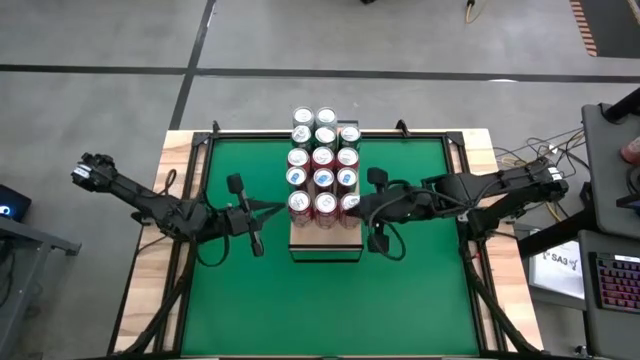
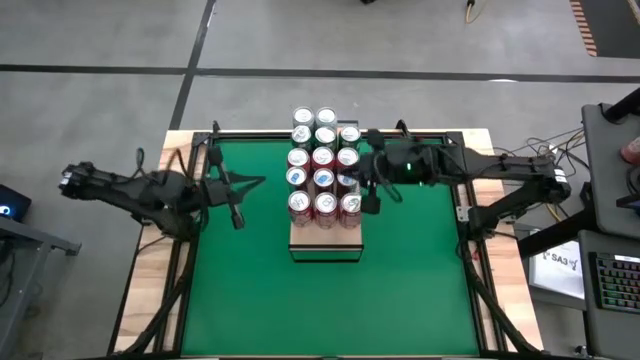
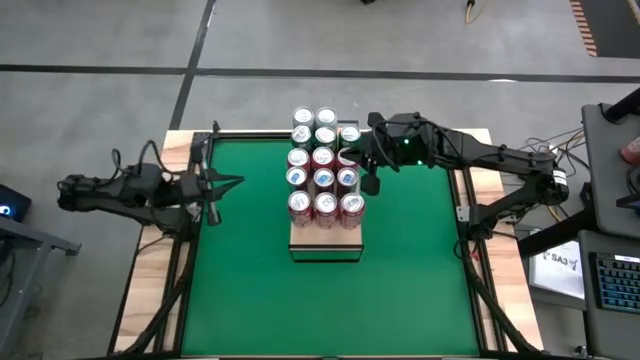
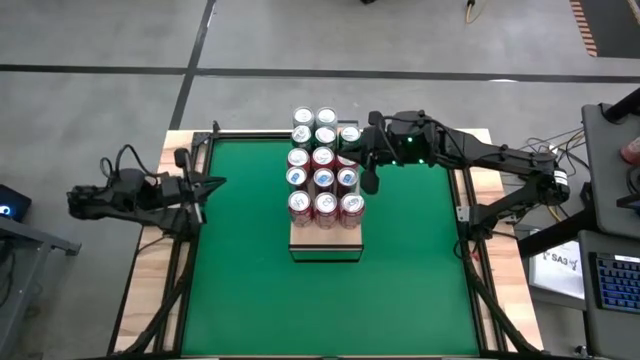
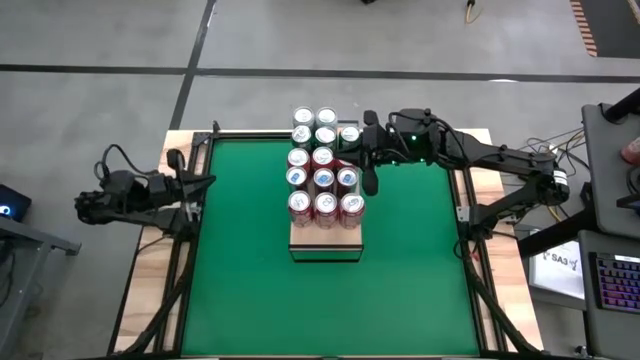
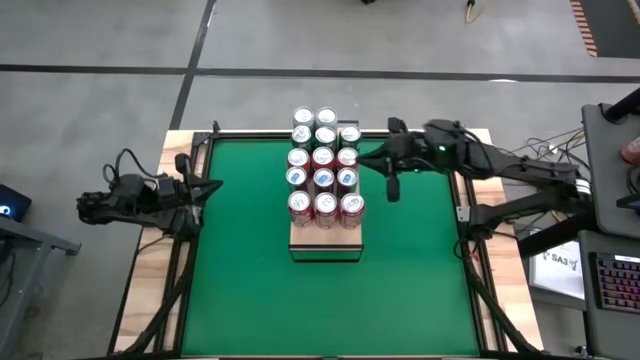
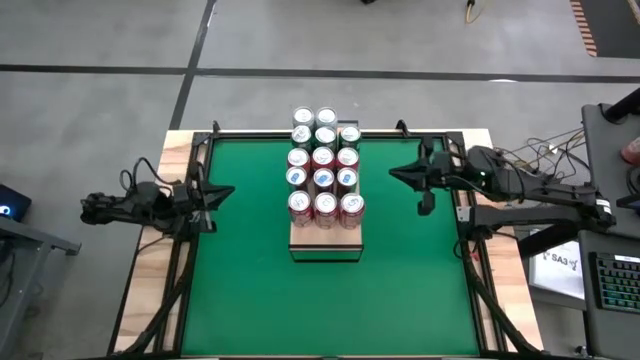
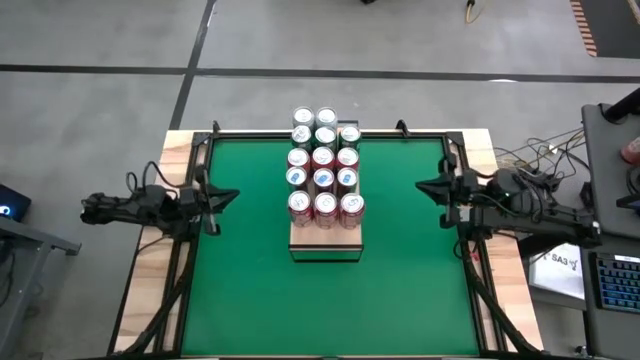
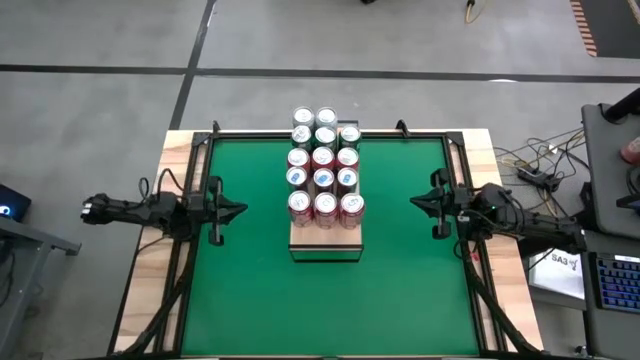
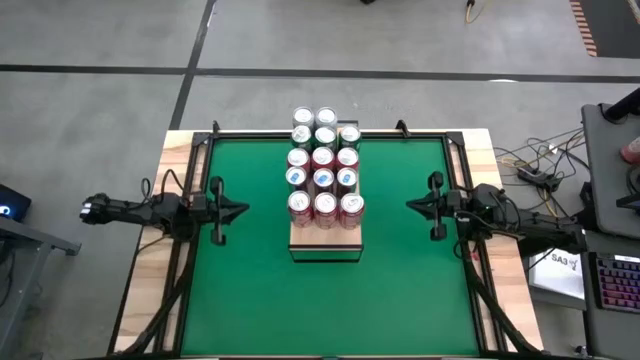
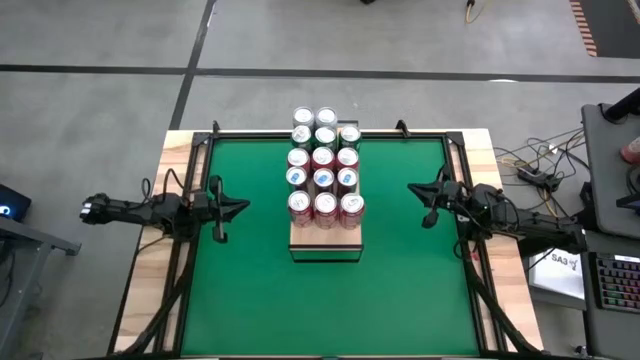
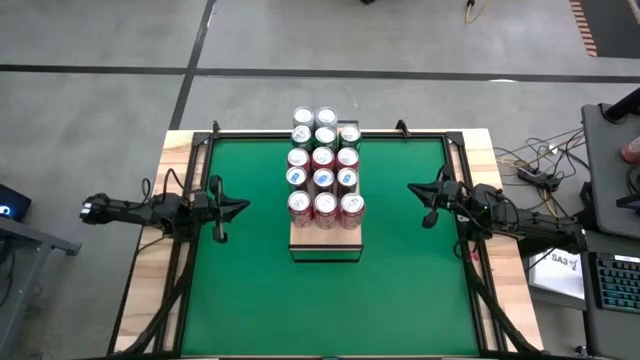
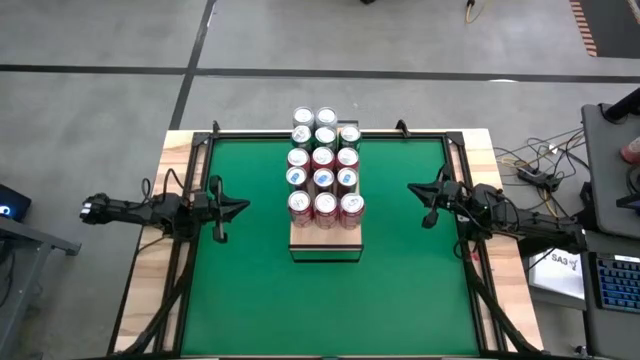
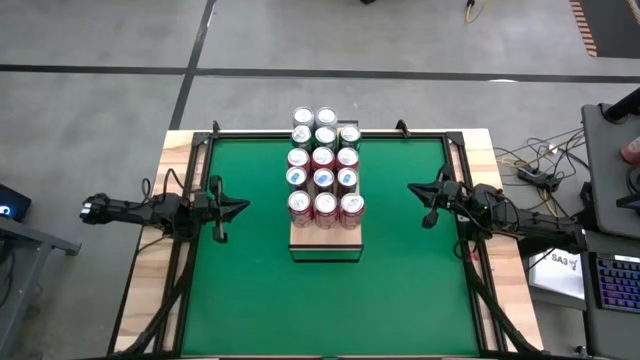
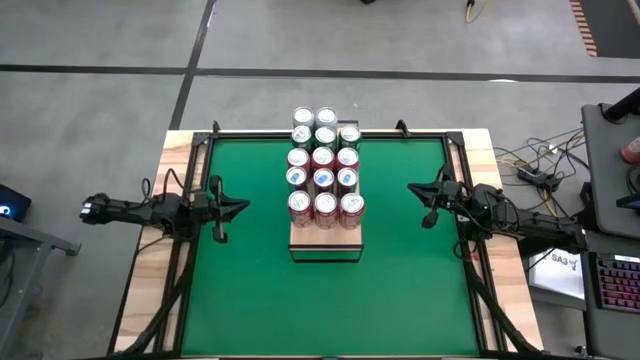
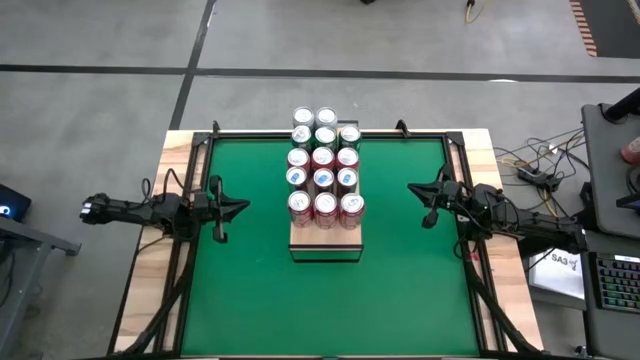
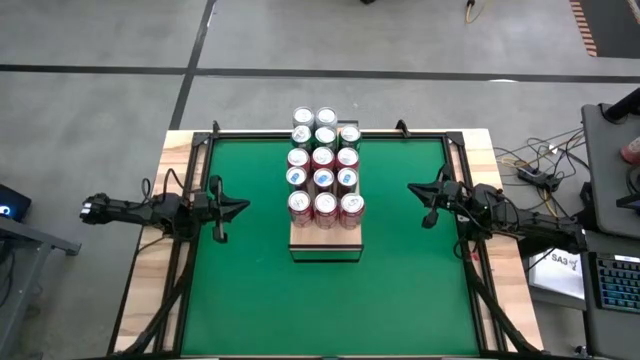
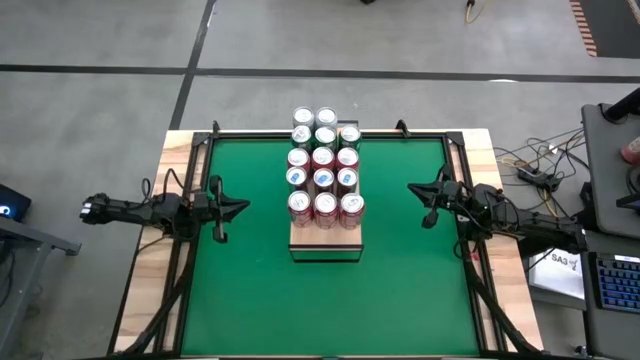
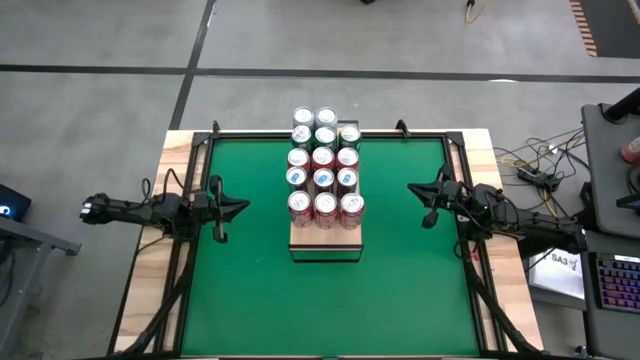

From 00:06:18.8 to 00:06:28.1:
Task: Place canned beverage on shelf
Return to Home Position

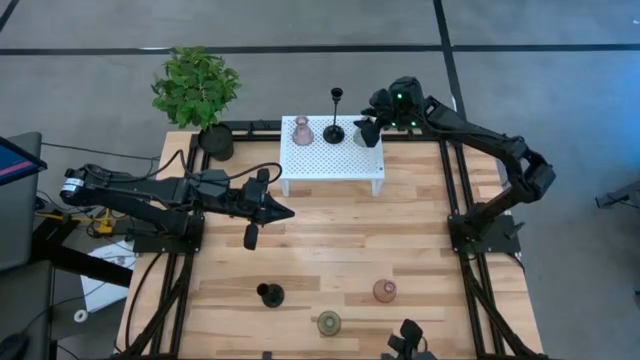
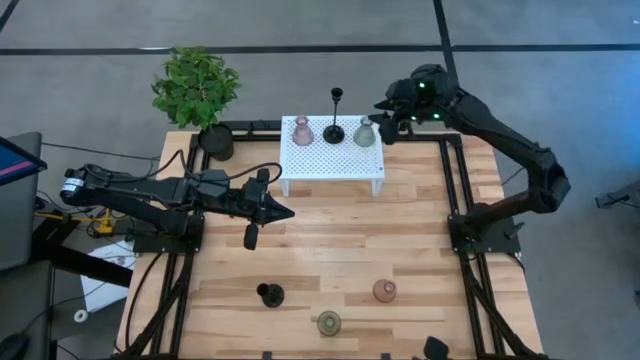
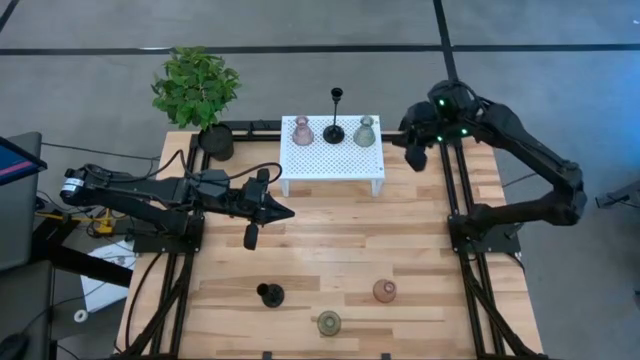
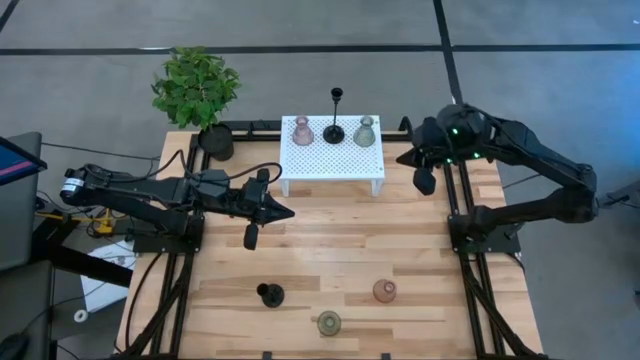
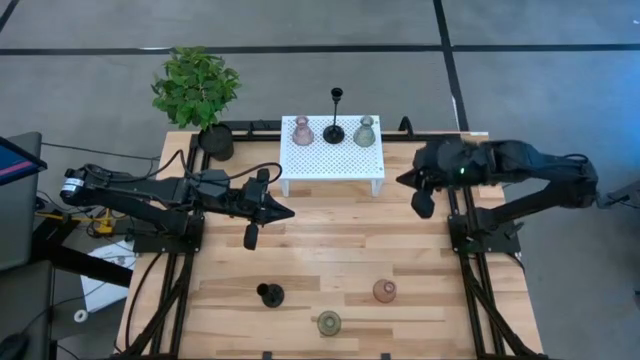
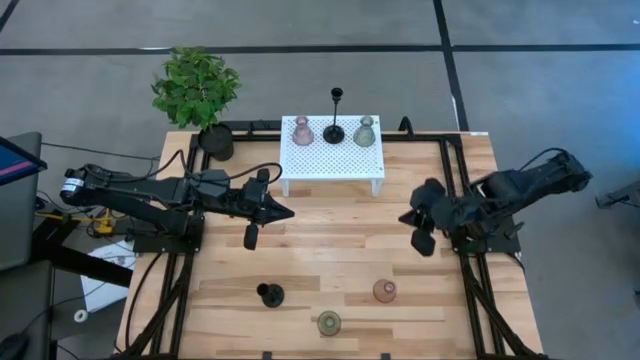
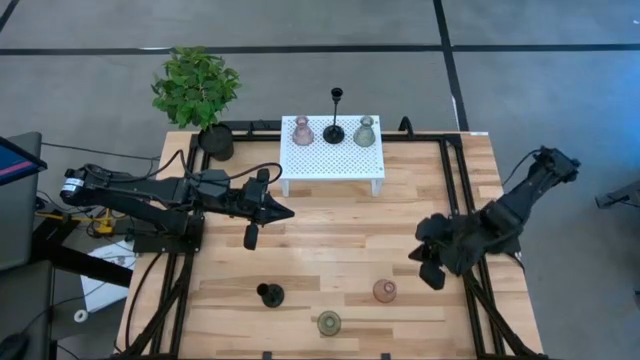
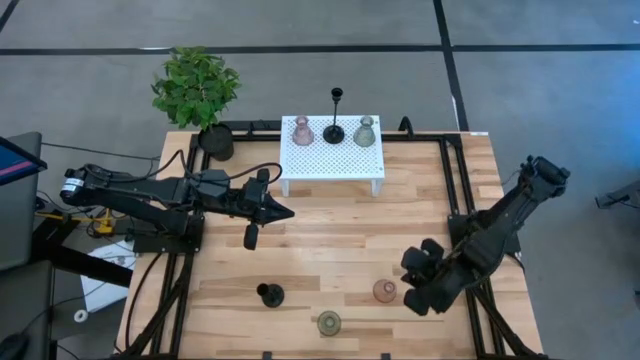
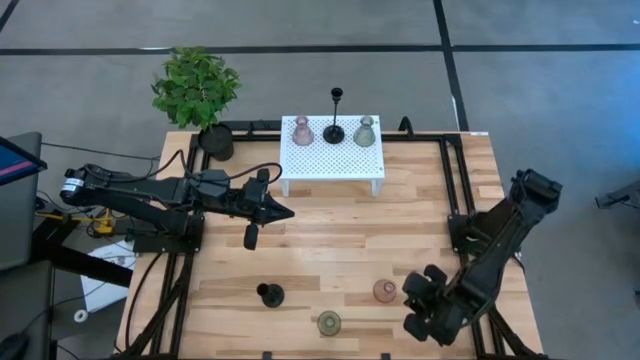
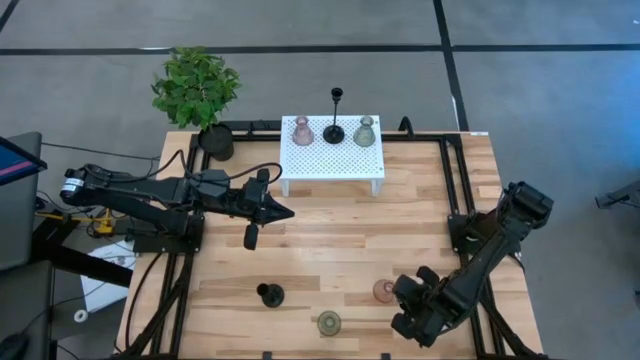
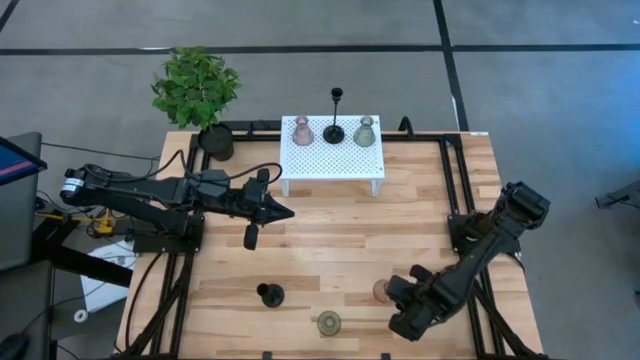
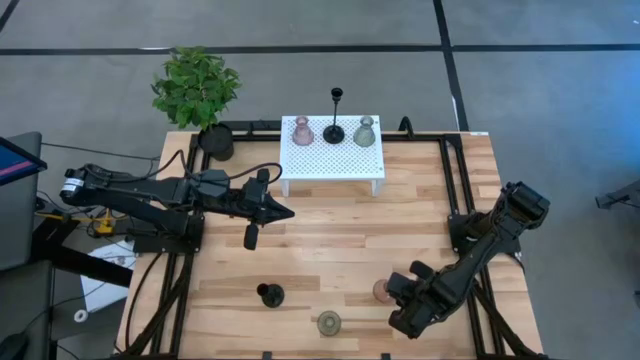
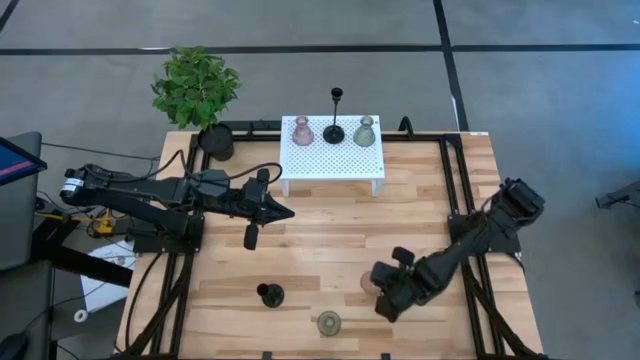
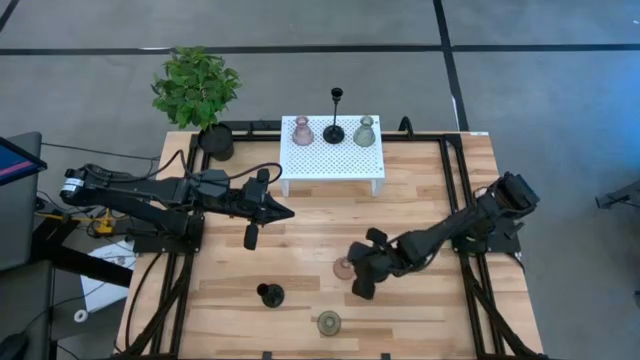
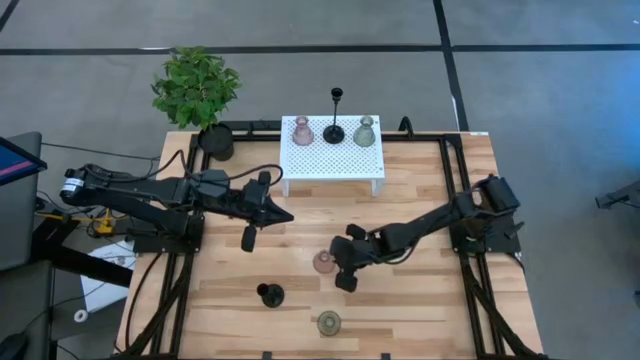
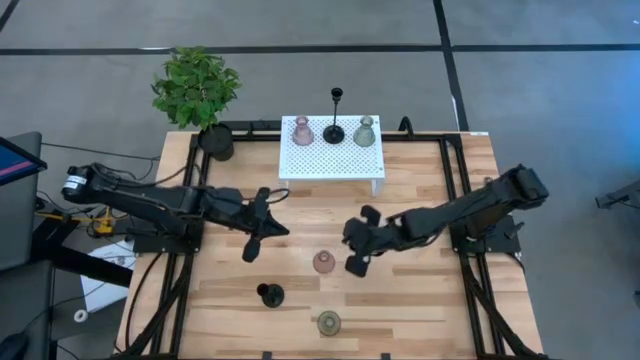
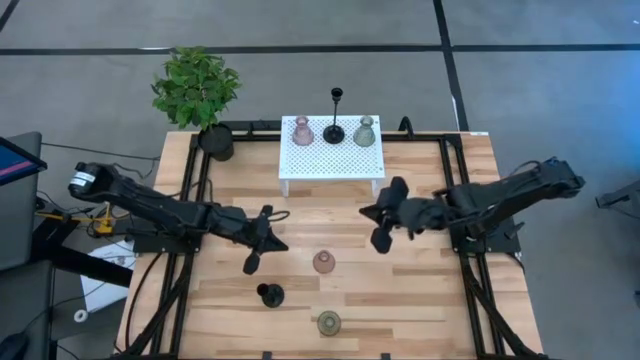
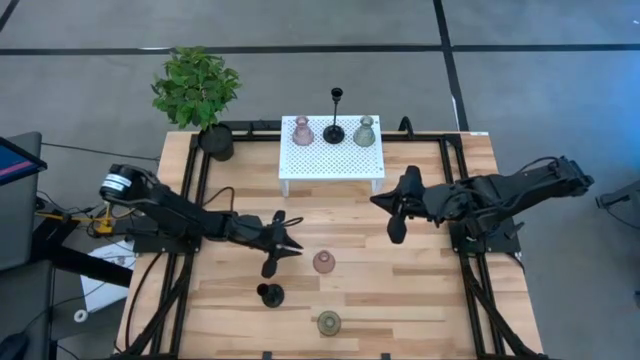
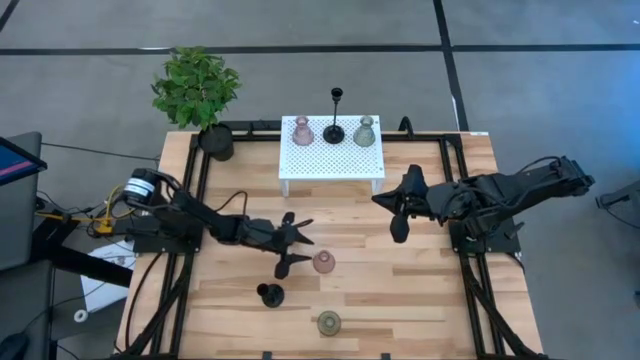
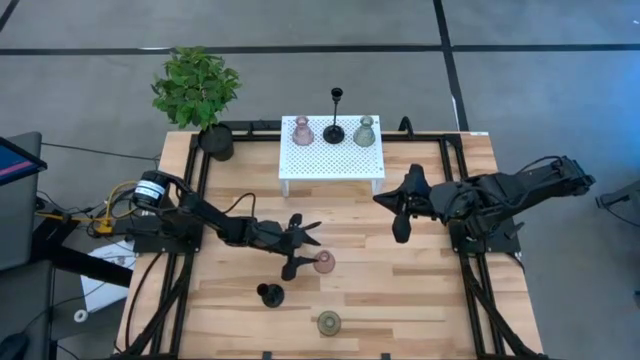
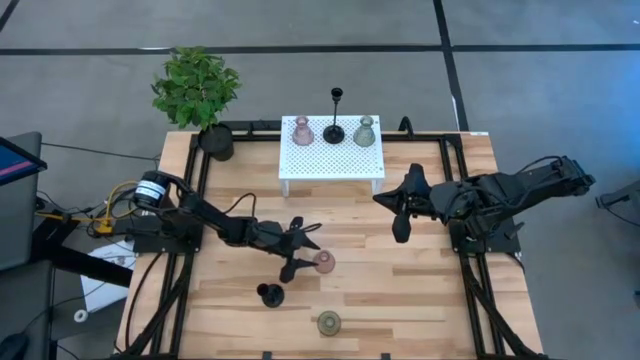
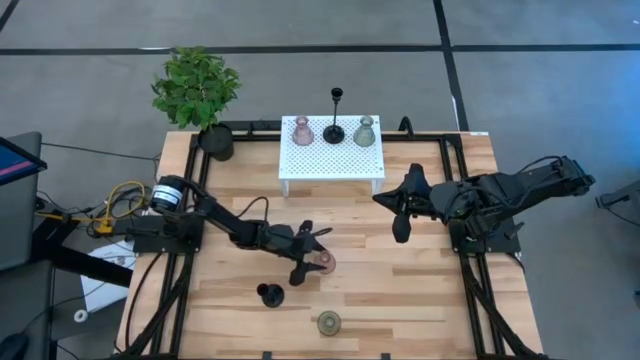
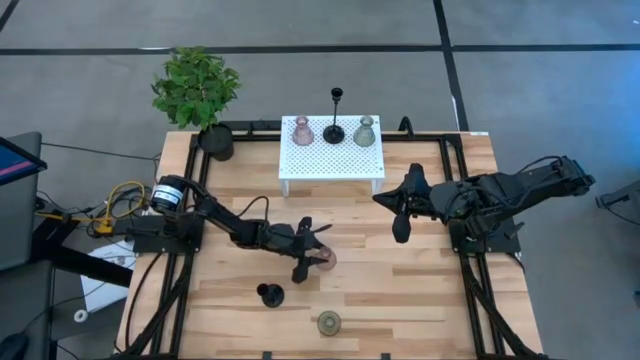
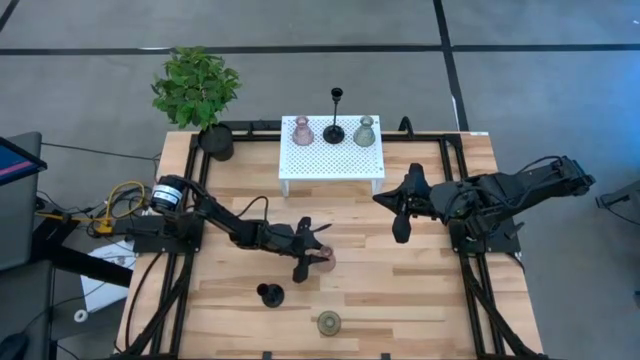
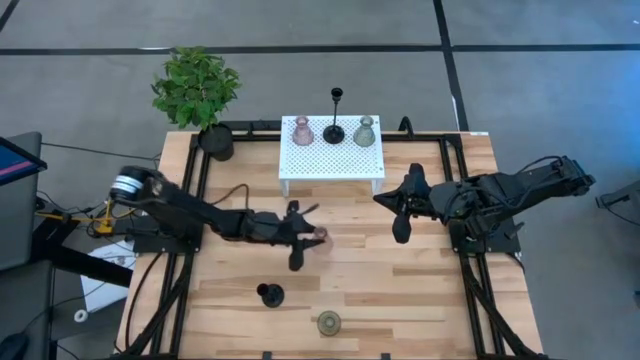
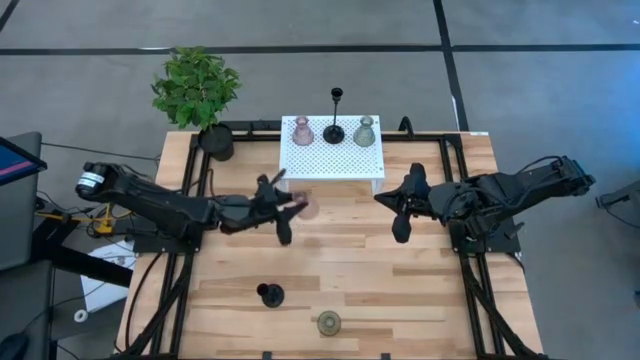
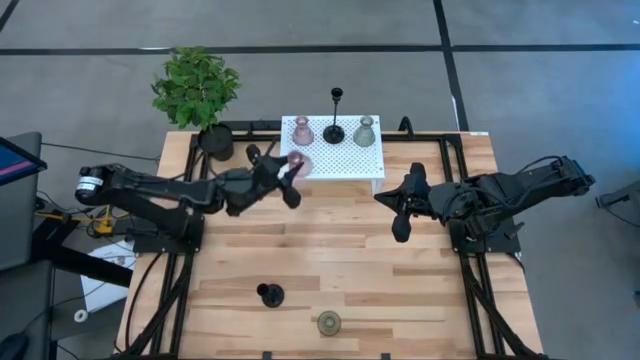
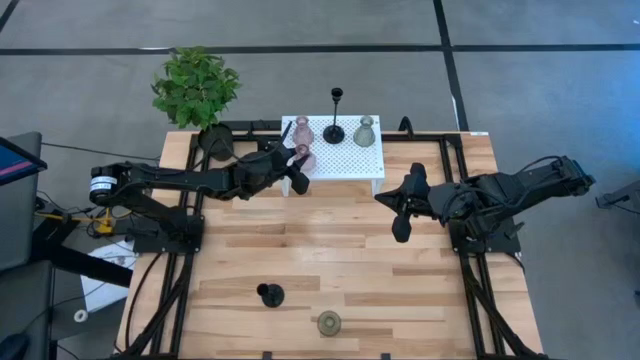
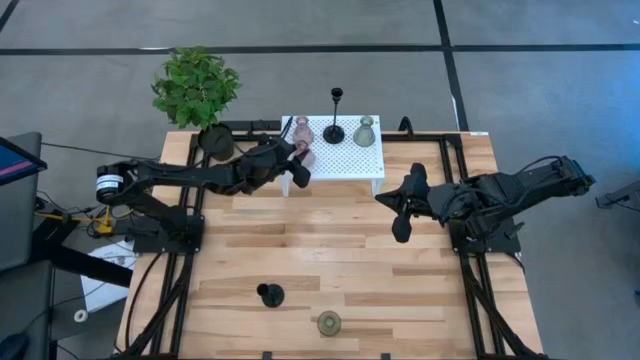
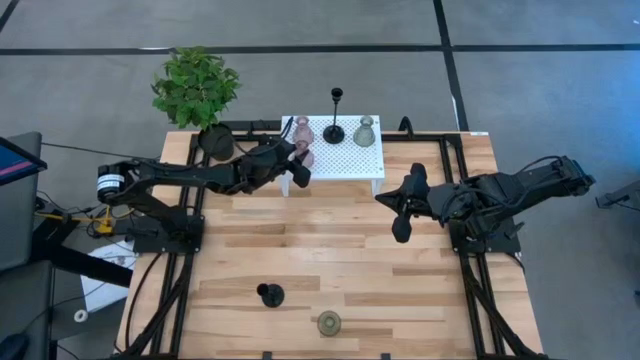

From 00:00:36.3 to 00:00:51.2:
Task: Pick & Place candle stick holders
Put the pink candle holder on the shelf
